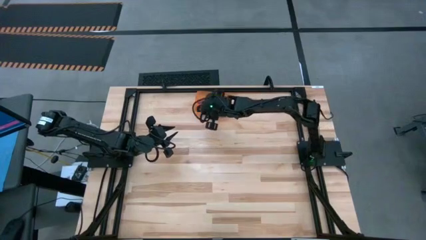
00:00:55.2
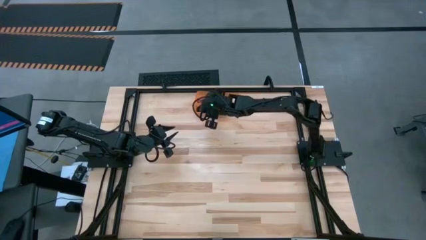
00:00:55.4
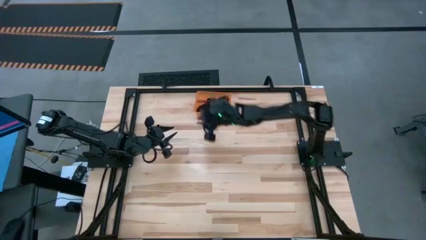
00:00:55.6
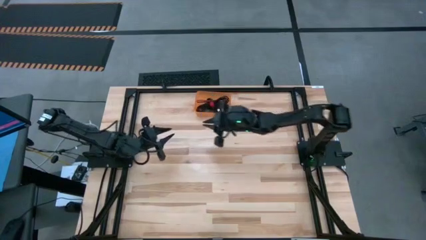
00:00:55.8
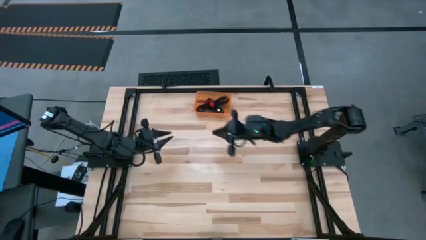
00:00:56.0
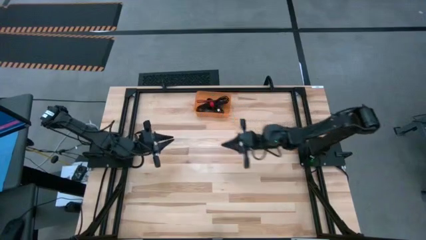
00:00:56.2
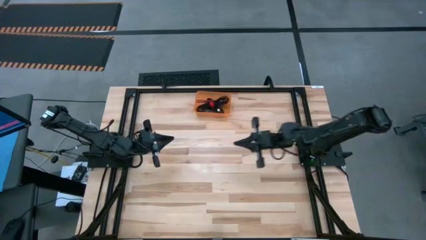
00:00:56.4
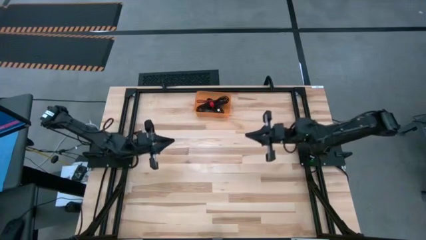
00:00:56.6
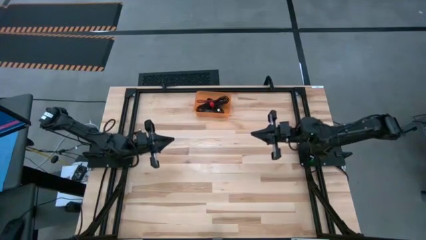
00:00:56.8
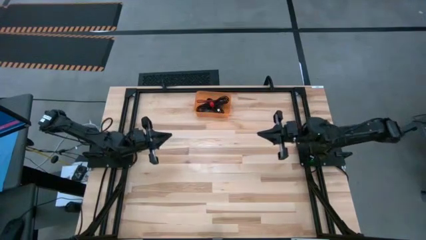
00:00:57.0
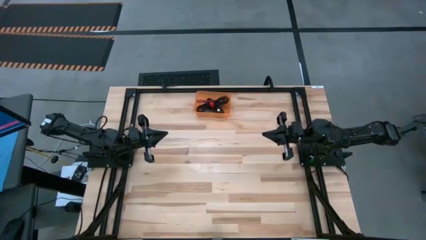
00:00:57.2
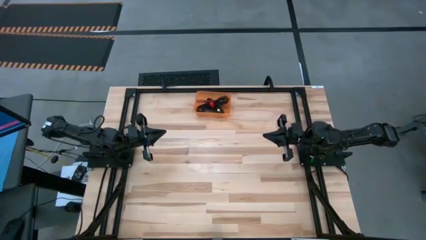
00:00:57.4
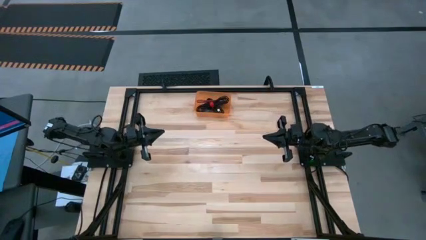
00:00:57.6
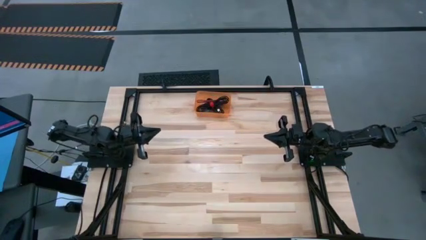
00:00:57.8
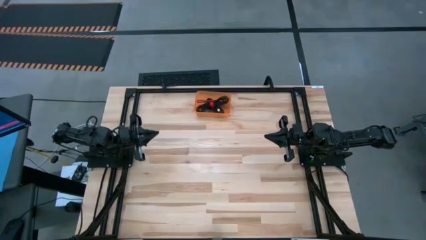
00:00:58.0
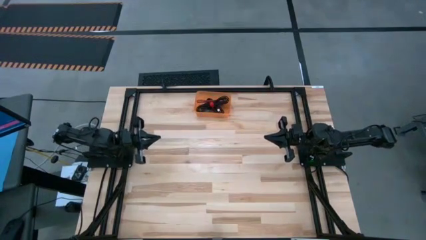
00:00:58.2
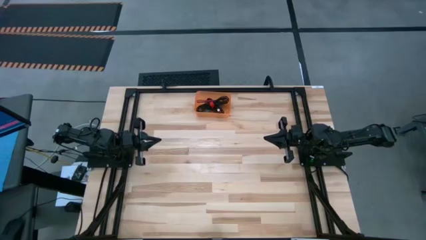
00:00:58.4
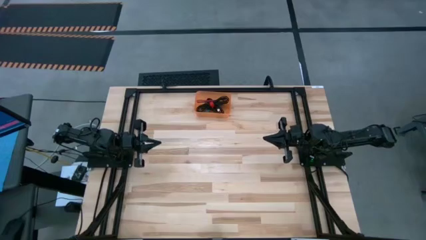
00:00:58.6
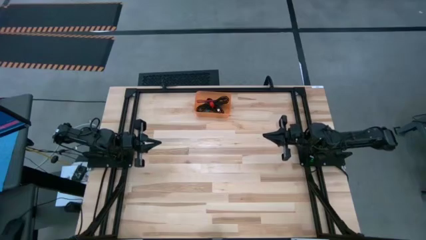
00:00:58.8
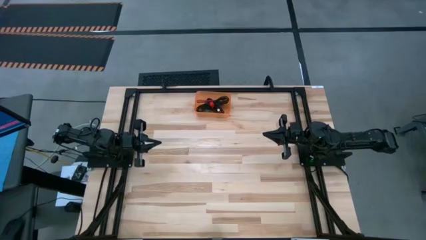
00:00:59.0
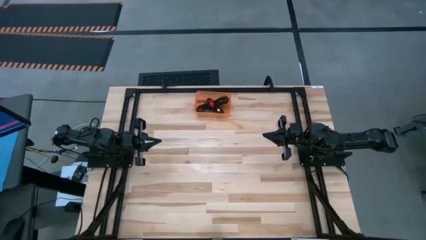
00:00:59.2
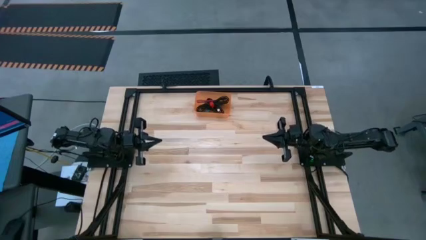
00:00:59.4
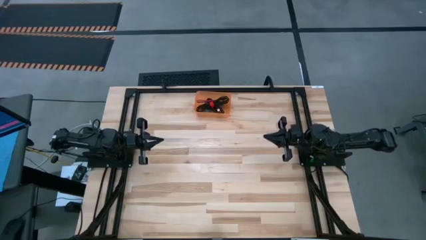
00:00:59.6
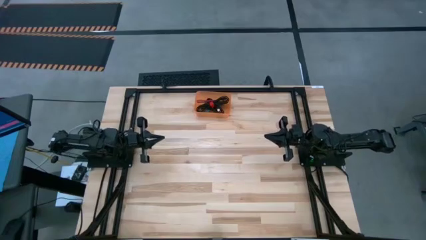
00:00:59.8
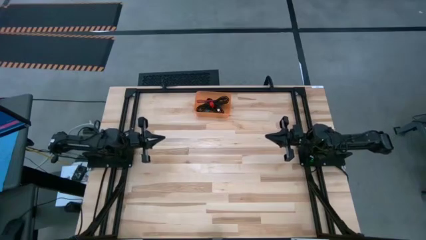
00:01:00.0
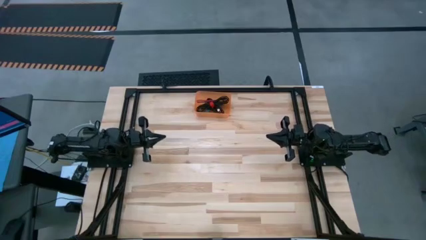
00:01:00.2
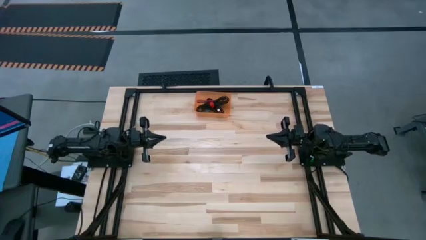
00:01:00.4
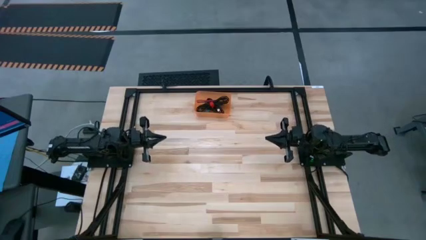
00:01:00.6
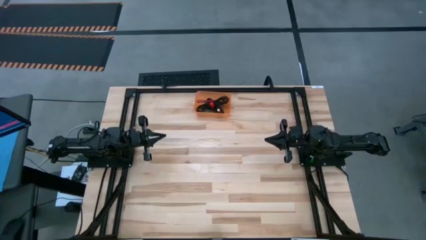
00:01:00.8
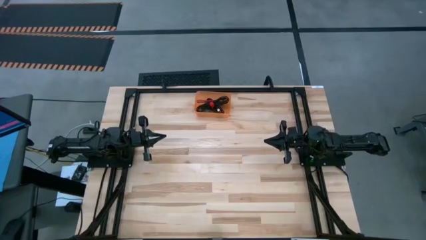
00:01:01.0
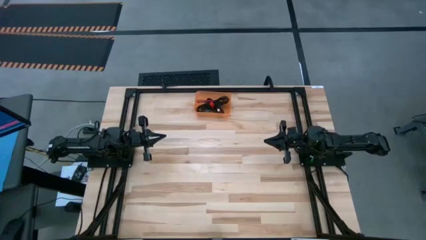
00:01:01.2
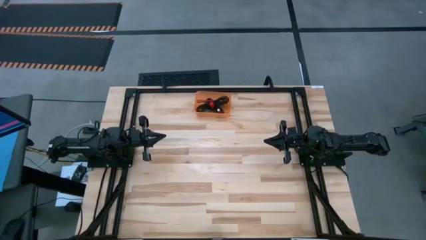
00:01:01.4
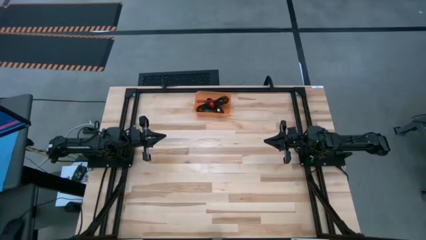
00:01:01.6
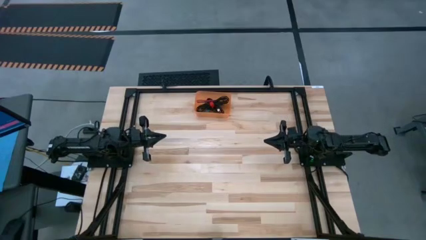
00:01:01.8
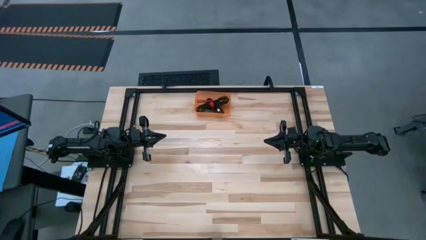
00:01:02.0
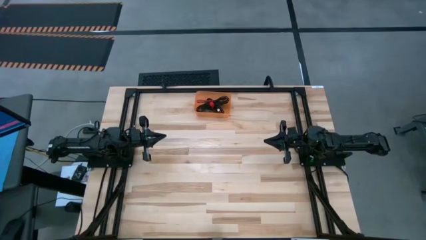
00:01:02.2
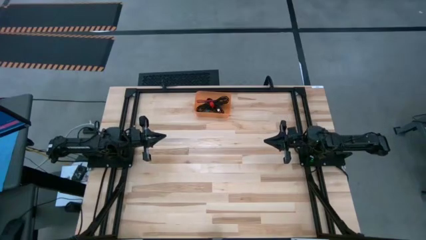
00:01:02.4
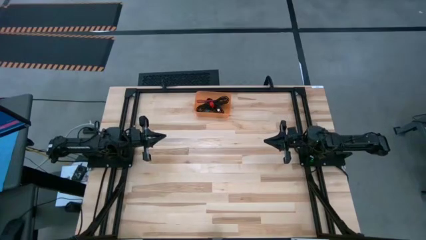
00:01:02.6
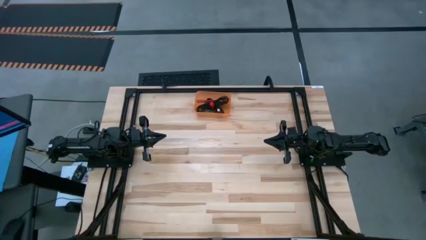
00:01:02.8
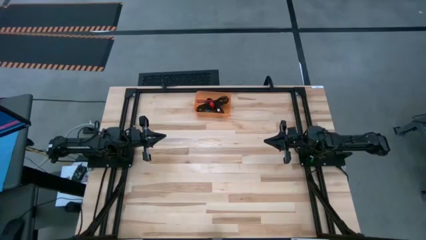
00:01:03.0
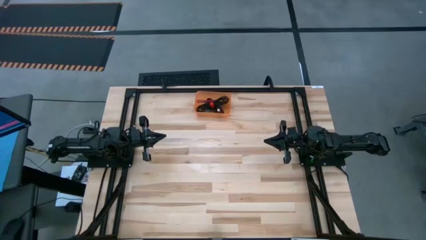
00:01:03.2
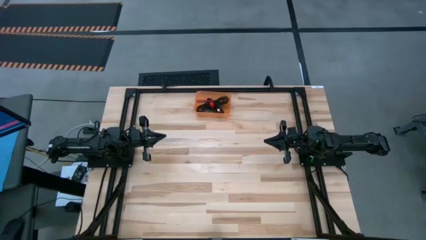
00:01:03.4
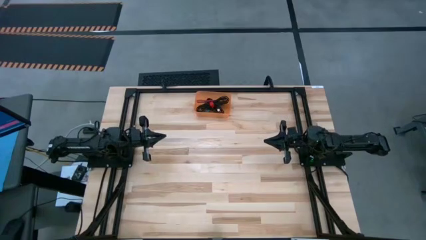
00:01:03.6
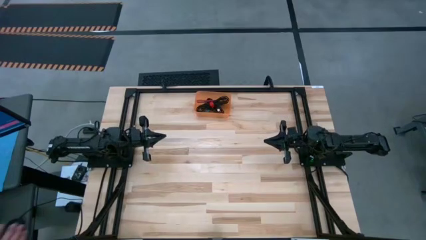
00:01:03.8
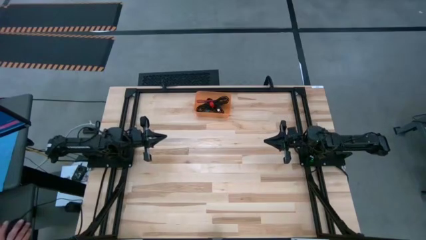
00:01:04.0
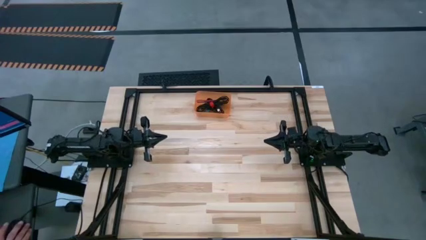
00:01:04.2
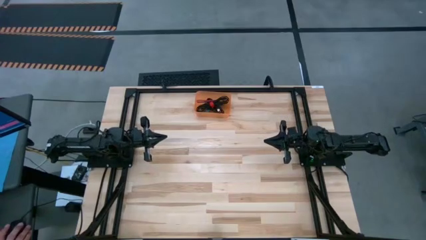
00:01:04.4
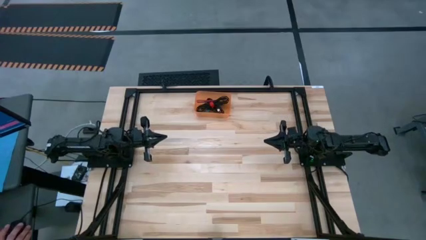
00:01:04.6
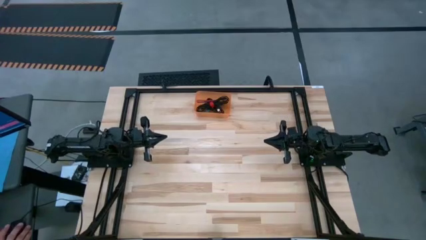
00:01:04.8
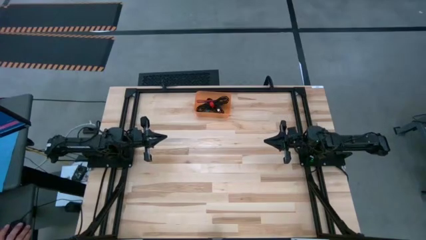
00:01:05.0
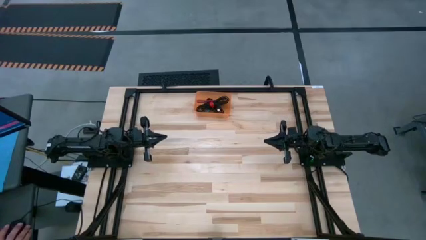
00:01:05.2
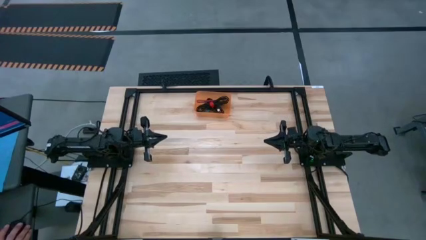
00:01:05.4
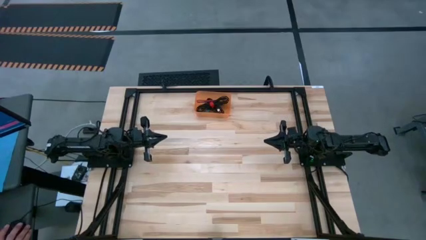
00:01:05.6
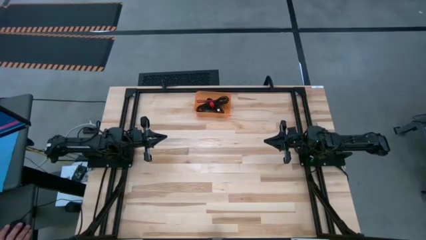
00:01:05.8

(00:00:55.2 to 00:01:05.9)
Task: Pick and place USB-C Cables
Return to Home Position

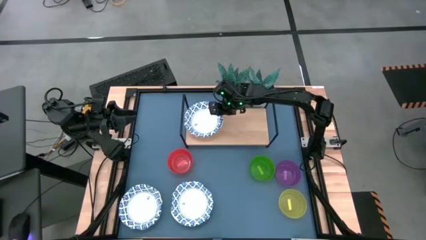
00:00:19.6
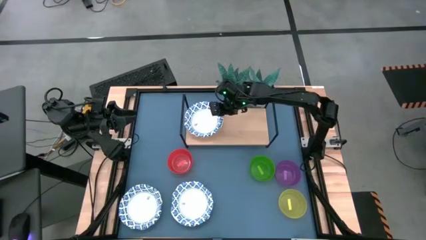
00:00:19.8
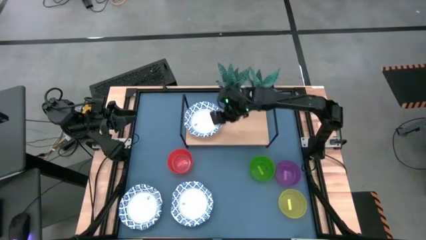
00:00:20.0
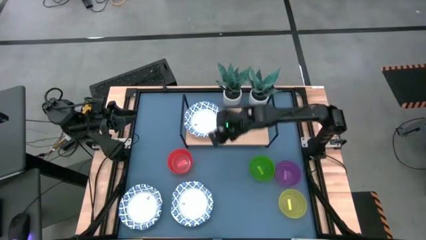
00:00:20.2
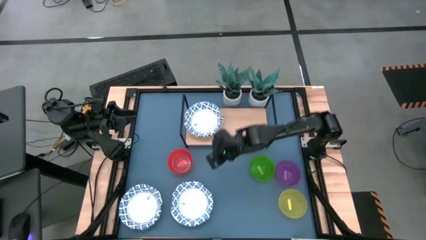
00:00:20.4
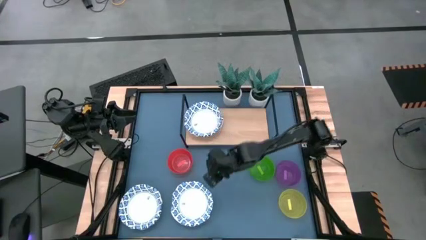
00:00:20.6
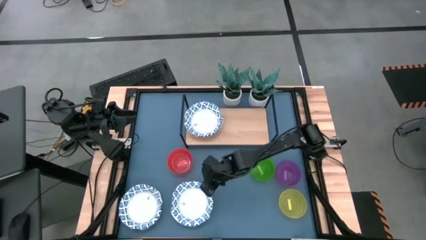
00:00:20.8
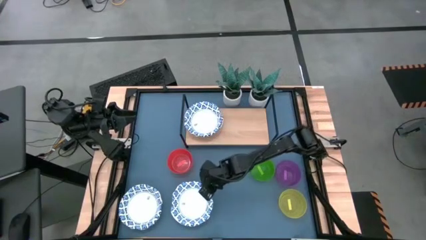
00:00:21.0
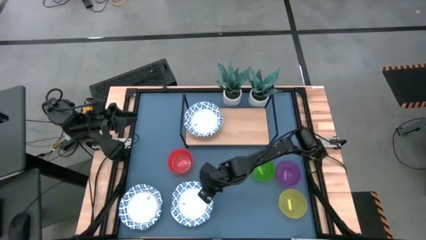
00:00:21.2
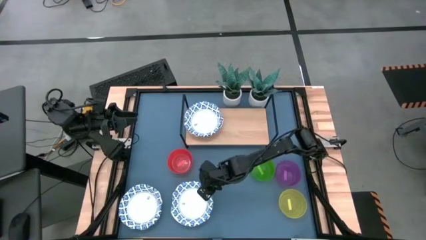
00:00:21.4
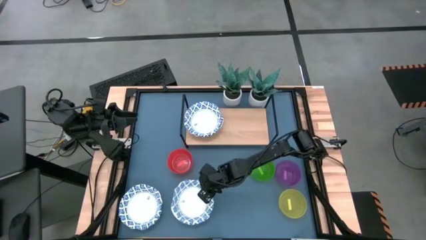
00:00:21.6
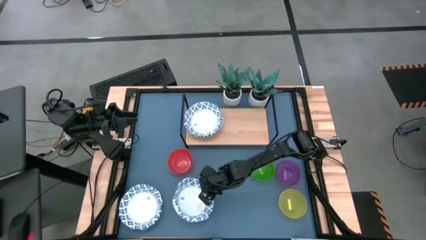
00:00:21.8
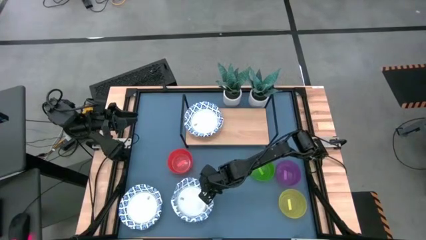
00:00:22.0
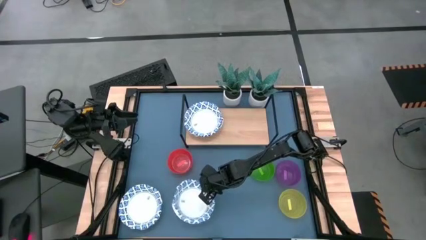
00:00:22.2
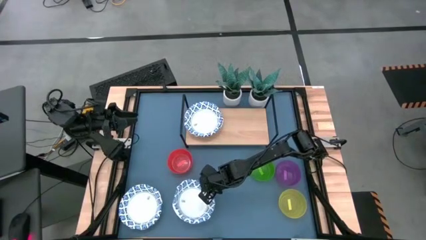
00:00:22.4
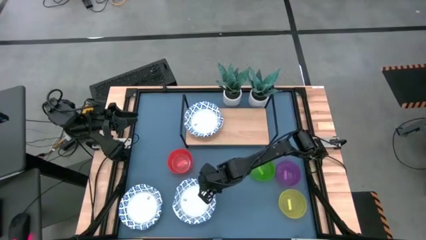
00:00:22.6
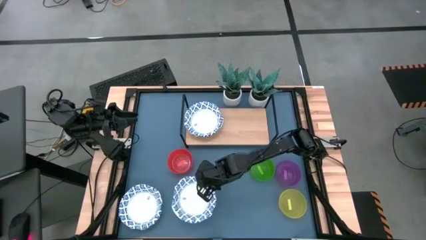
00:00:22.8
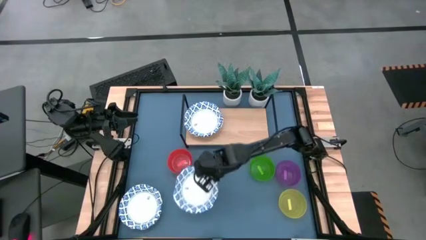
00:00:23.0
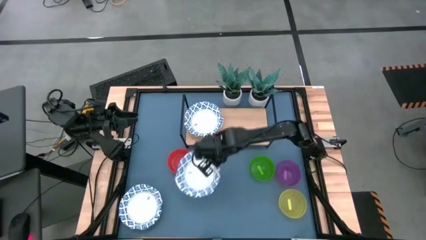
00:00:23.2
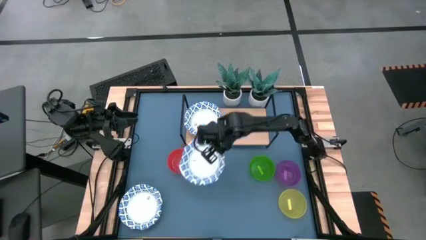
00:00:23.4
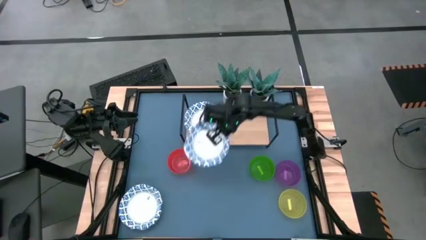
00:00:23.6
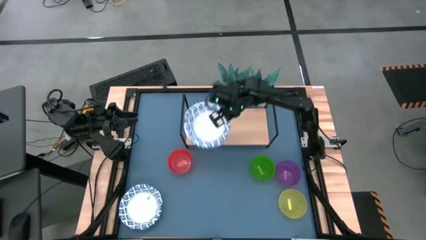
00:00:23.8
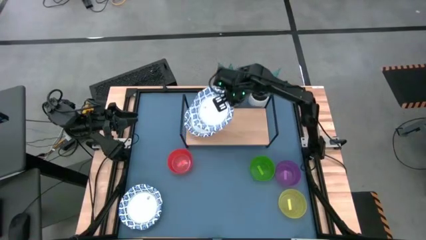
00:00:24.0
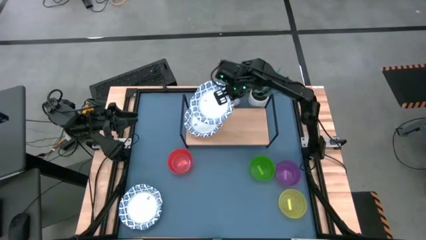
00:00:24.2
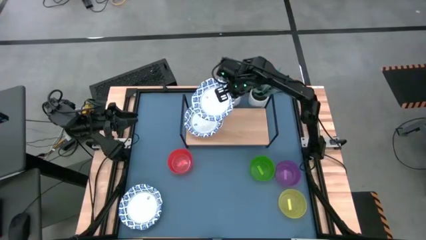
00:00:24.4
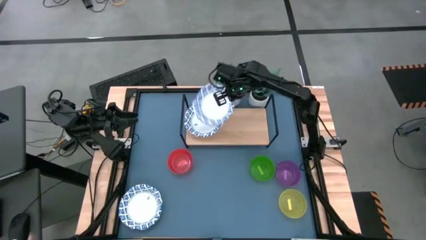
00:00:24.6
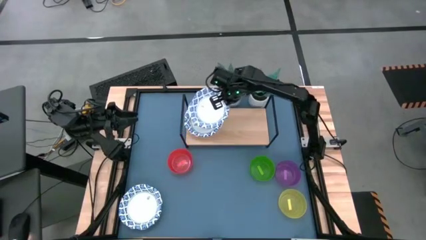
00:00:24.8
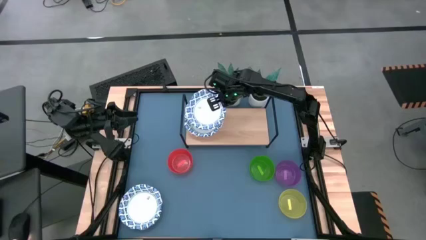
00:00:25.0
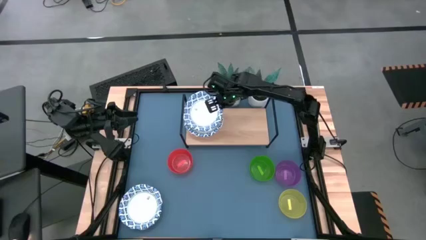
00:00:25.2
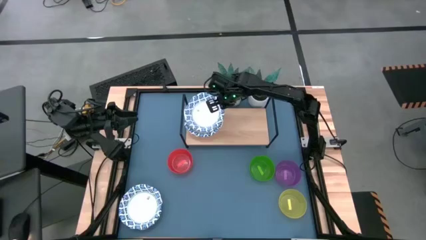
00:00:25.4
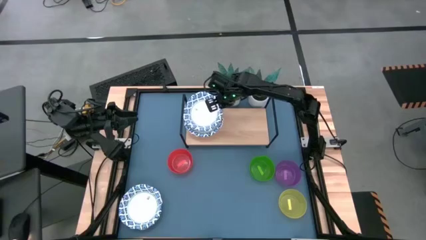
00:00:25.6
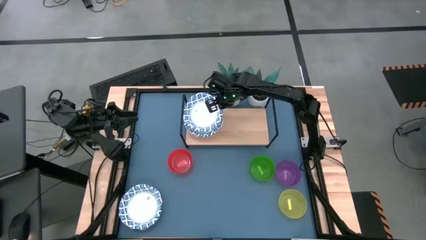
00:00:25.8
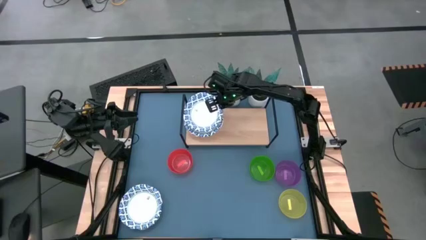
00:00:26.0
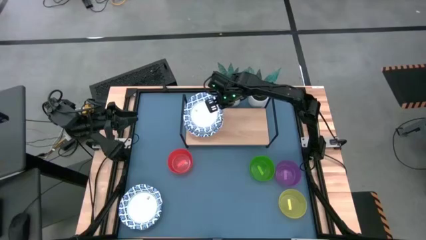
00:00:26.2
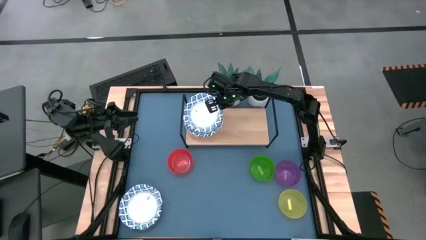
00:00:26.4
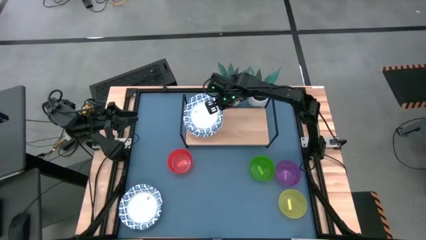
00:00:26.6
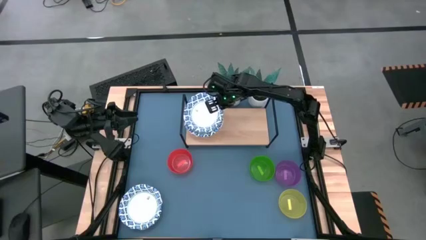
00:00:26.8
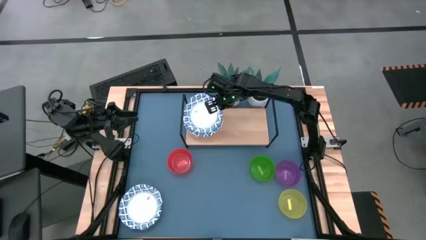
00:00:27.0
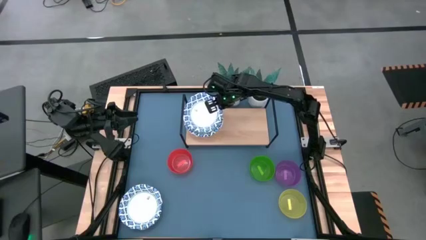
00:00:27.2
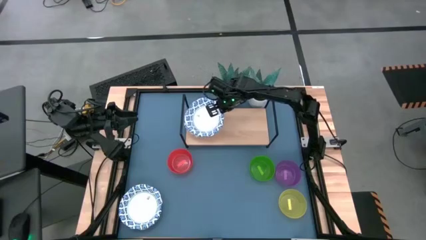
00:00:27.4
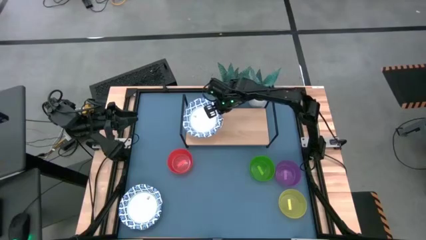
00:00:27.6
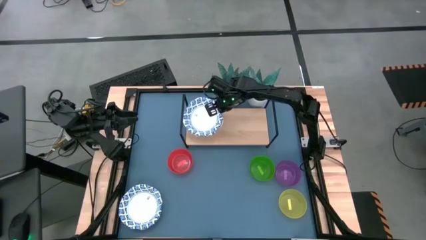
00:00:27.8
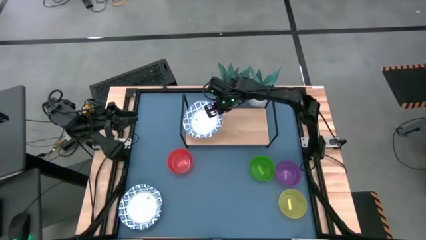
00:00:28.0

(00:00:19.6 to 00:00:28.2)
Task: Place and stack bowls onto a shelf
Stack the right white and blue plate on top of the other white and blue plates on the shelf
